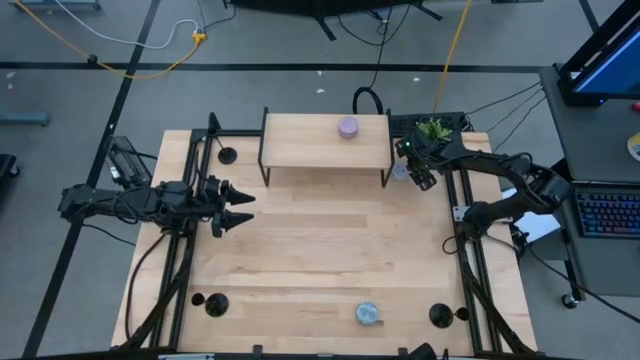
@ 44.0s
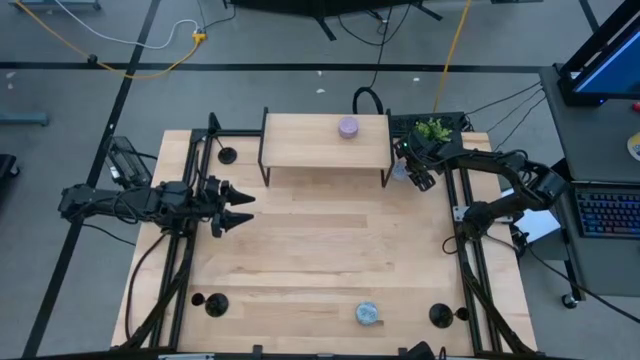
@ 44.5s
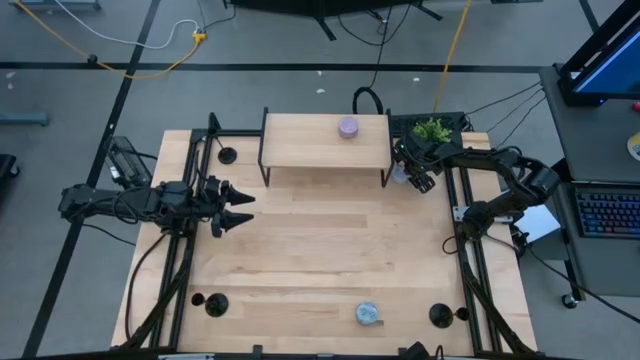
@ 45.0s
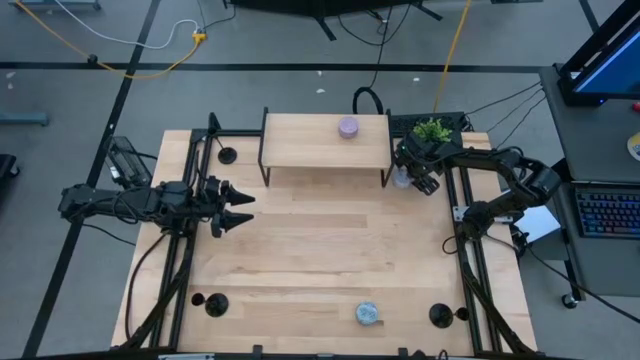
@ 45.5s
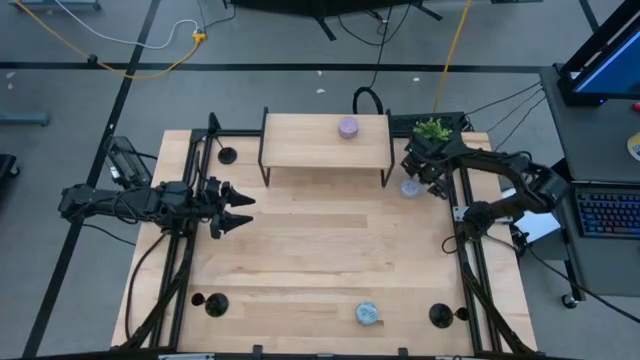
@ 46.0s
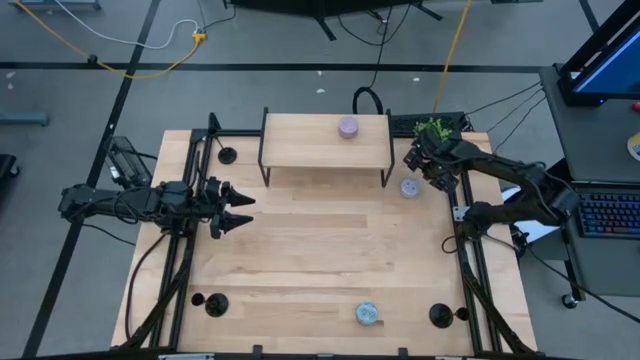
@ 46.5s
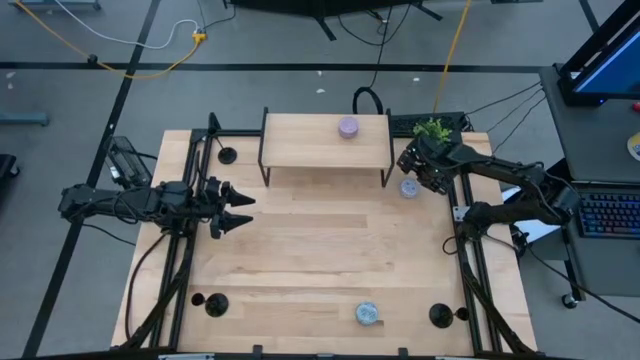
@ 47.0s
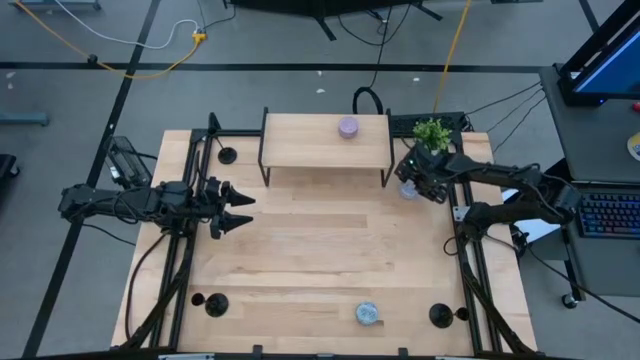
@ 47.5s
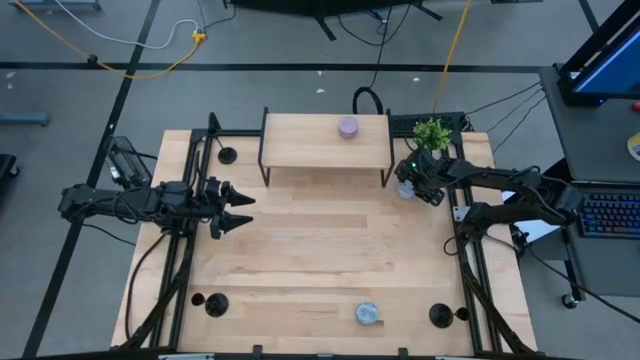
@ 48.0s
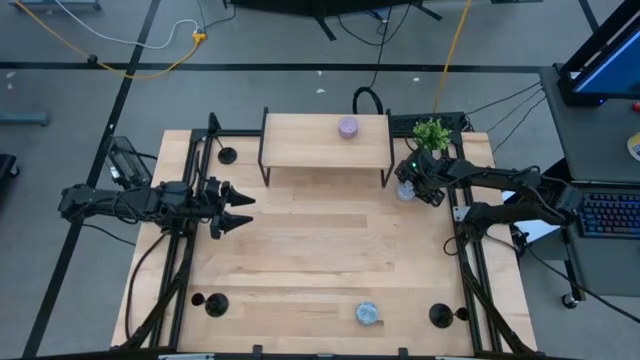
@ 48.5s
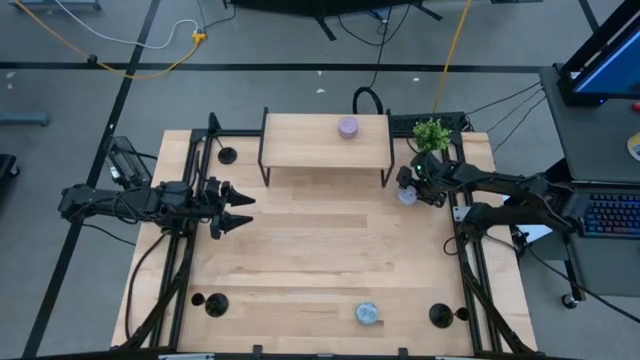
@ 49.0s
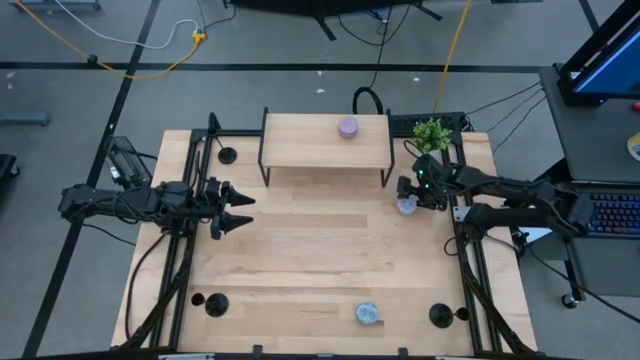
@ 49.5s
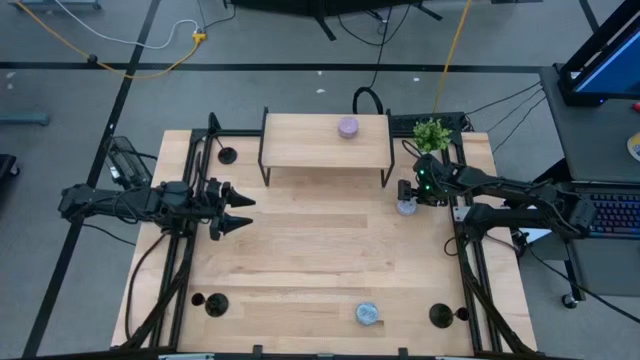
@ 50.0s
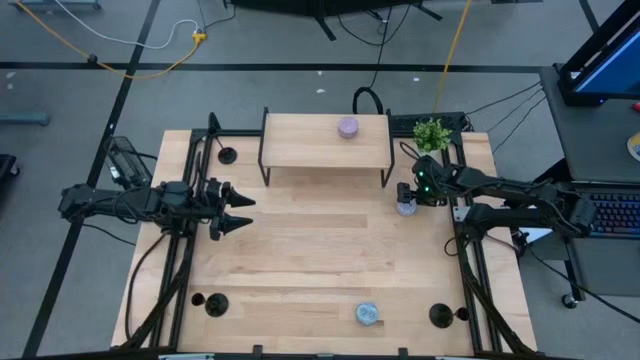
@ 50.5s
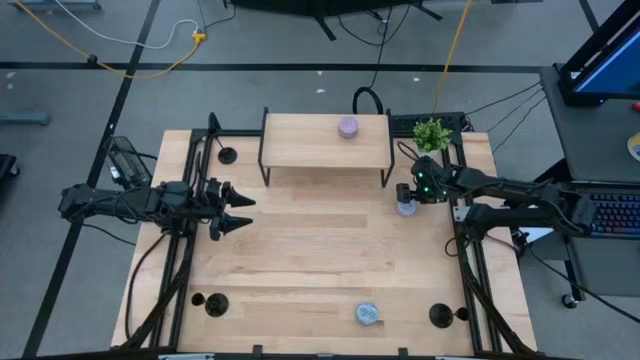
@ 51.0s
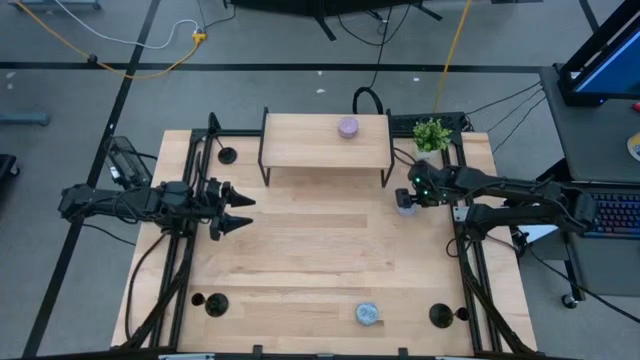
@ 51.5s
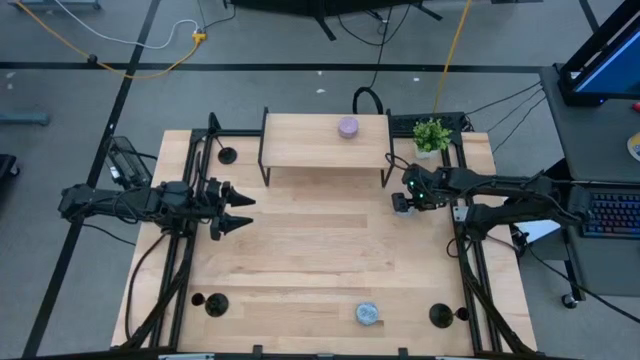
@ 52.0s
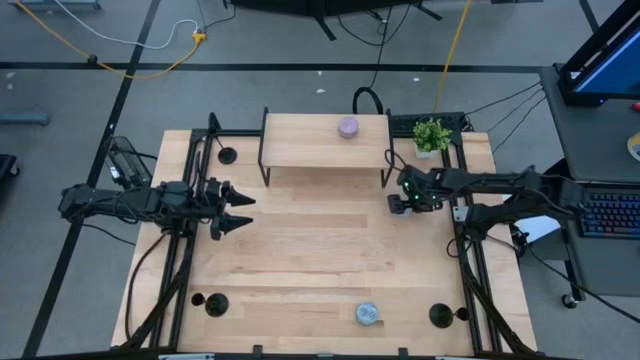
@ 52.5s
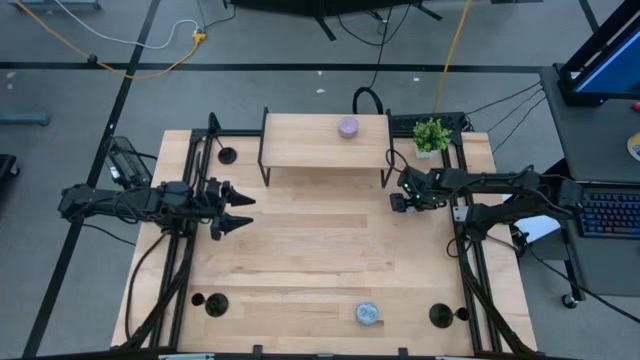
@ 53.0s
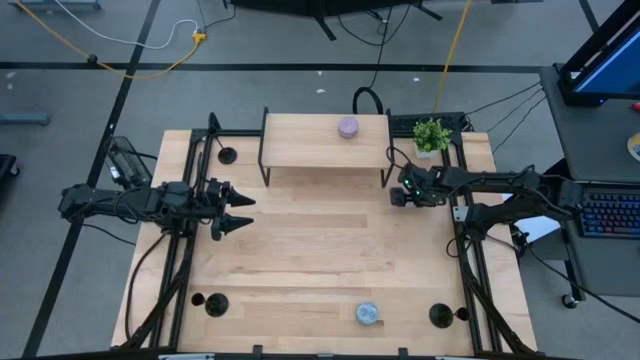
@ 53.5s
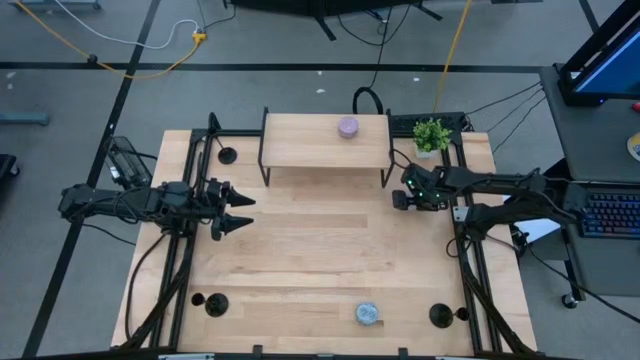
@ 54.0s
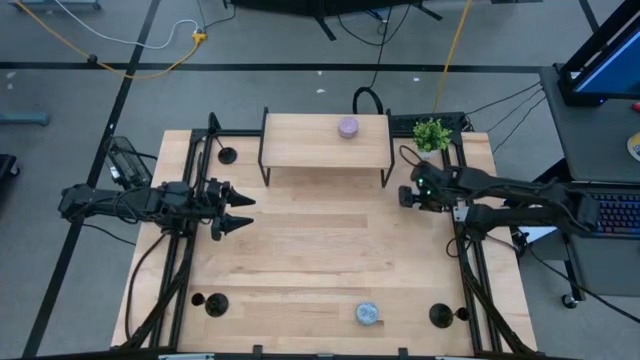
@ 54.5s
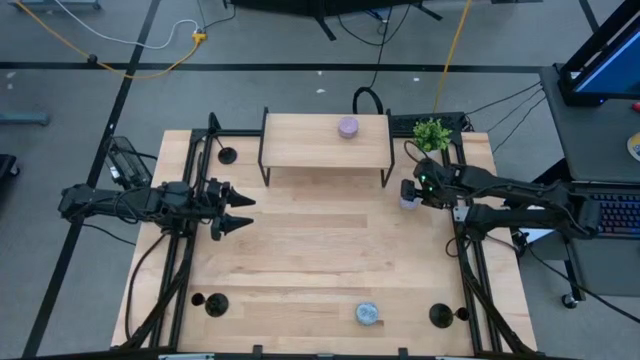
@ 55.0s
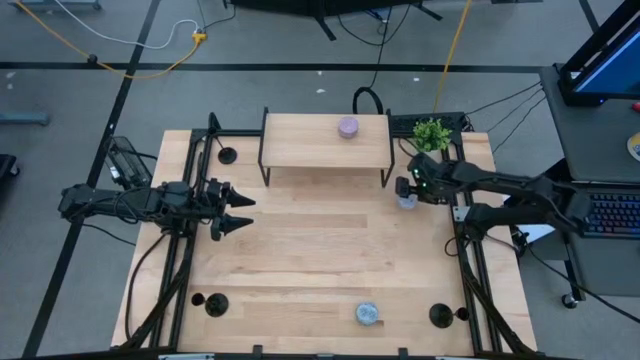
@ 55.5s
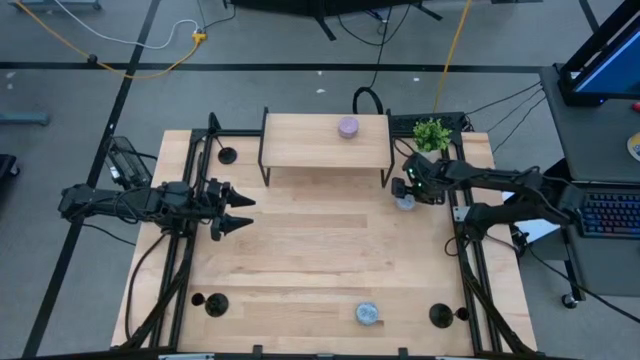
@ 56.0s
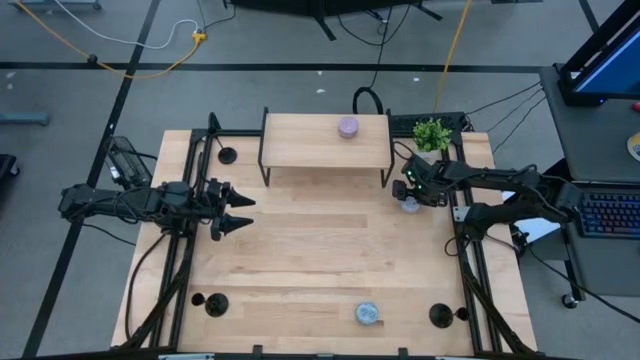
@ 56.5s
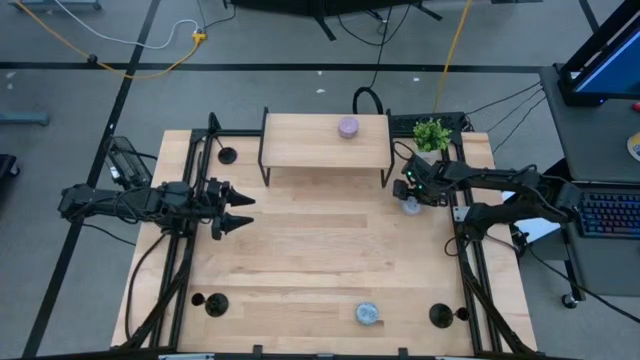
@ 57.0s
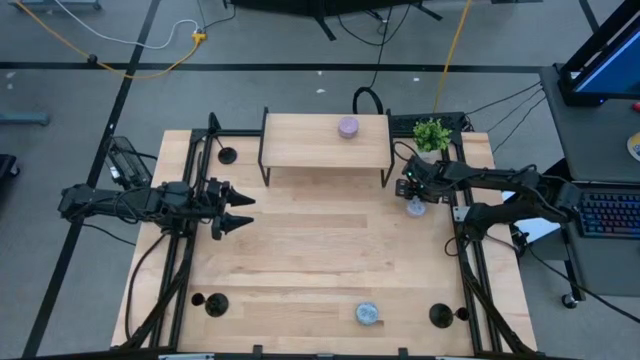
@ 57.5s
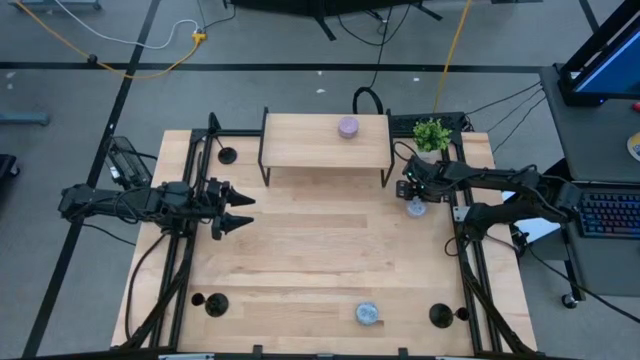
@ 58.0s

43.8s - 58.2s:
Task: Pick & Place candle stick holders
Put the white patterned scented candle on the shelf

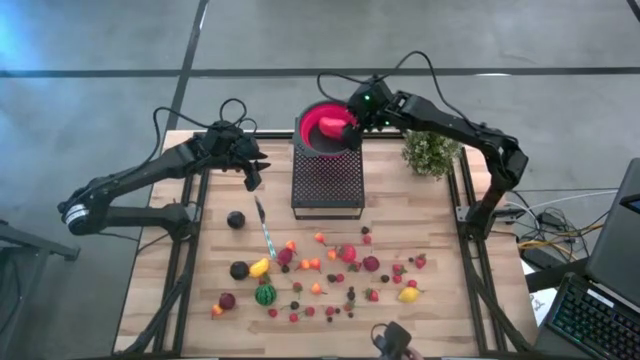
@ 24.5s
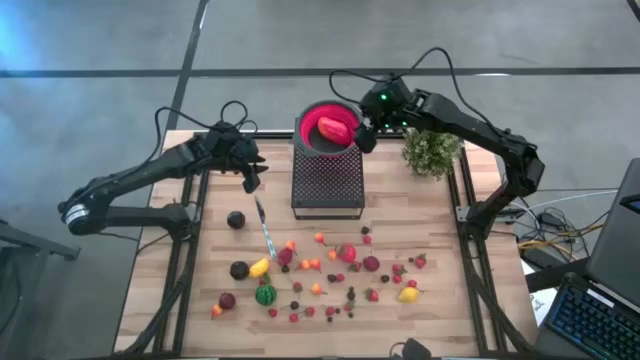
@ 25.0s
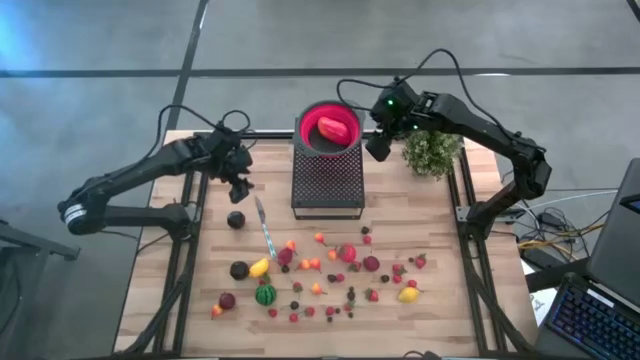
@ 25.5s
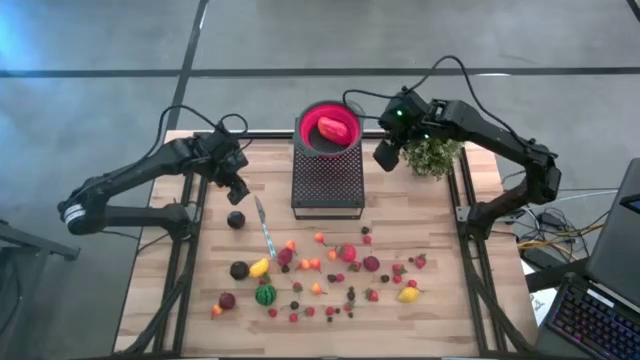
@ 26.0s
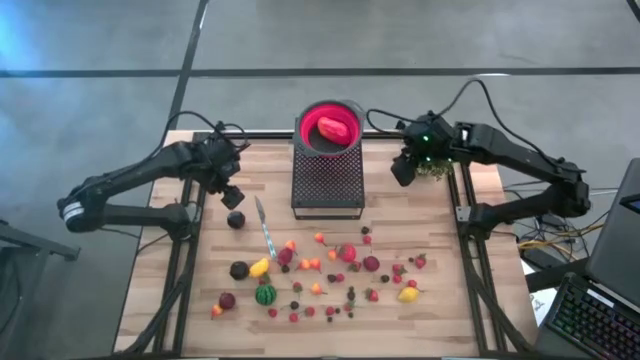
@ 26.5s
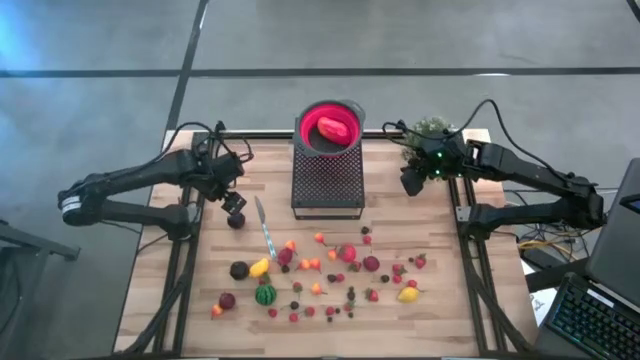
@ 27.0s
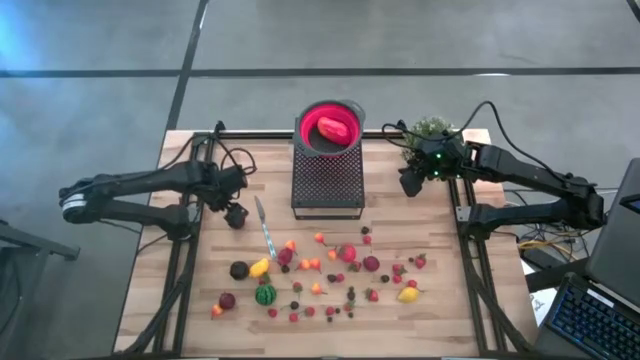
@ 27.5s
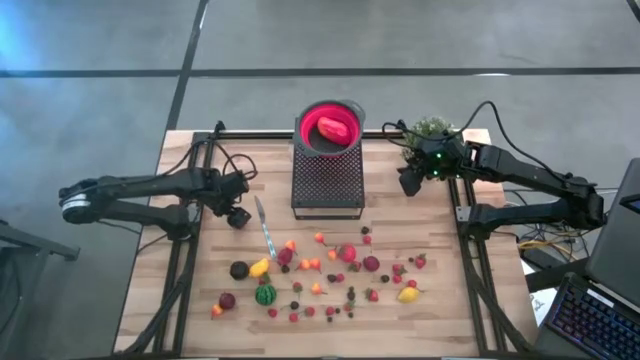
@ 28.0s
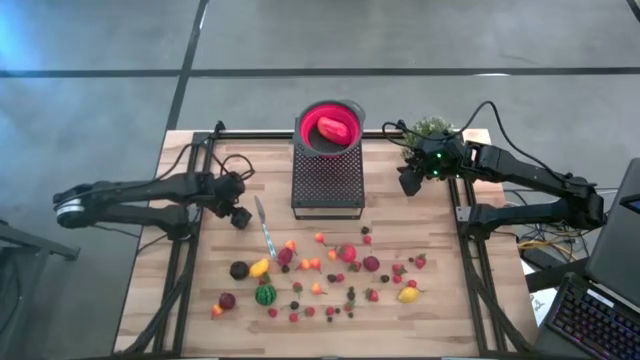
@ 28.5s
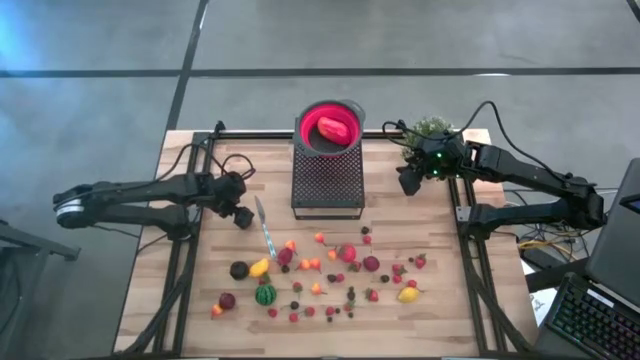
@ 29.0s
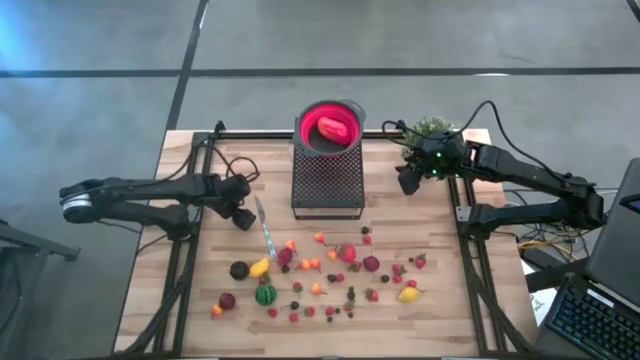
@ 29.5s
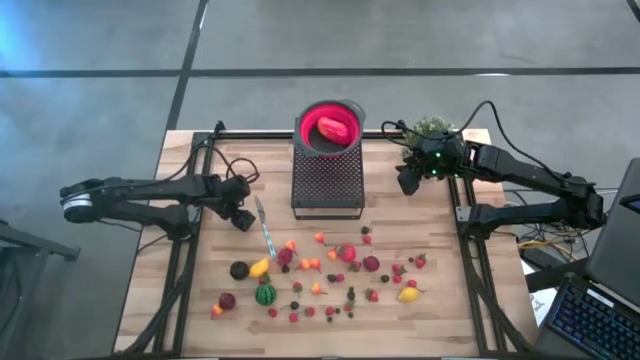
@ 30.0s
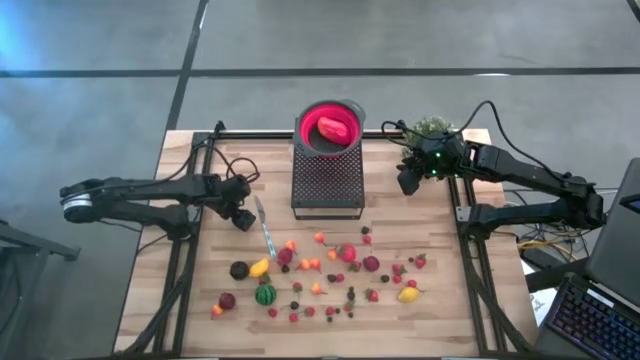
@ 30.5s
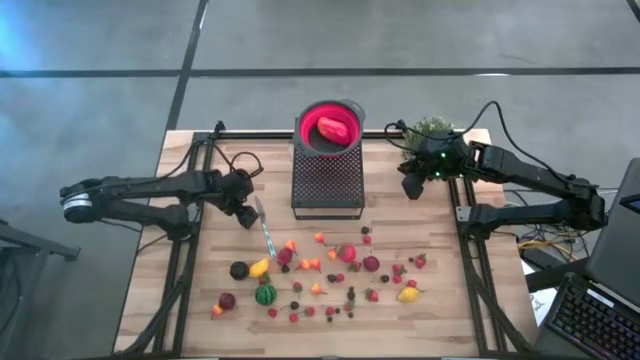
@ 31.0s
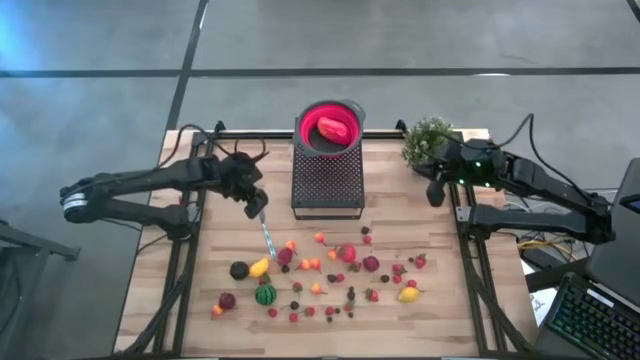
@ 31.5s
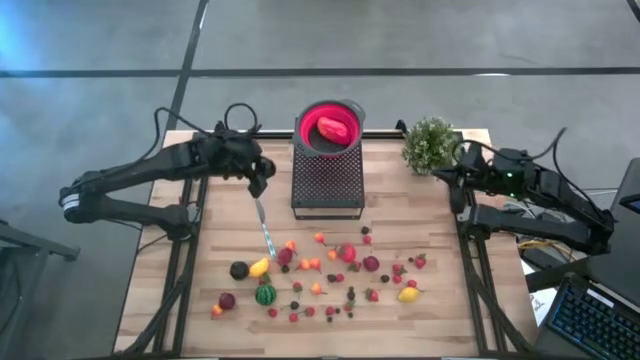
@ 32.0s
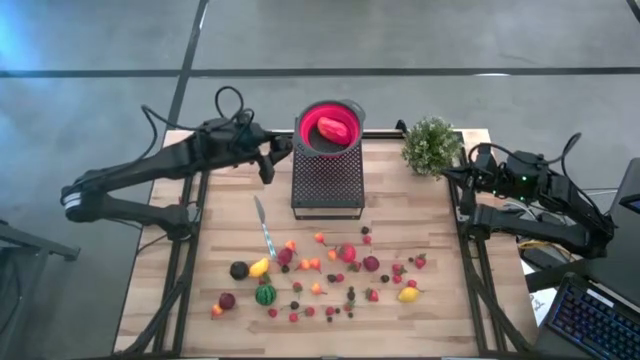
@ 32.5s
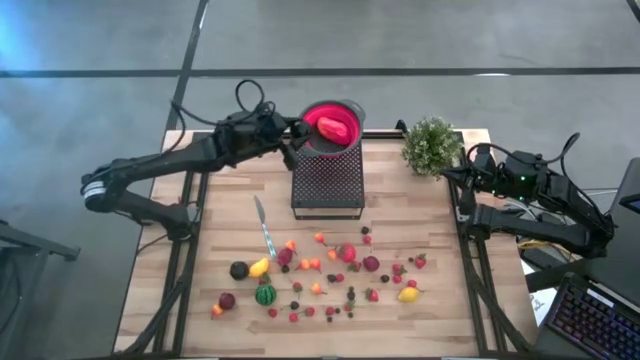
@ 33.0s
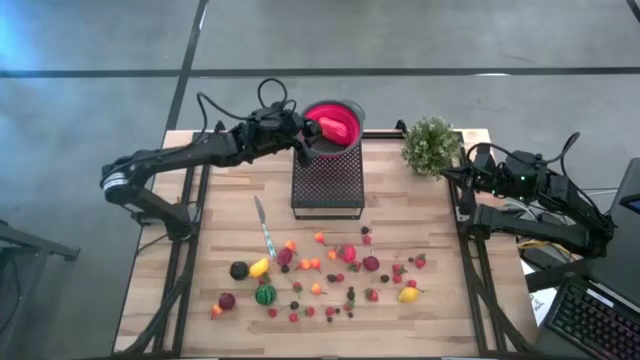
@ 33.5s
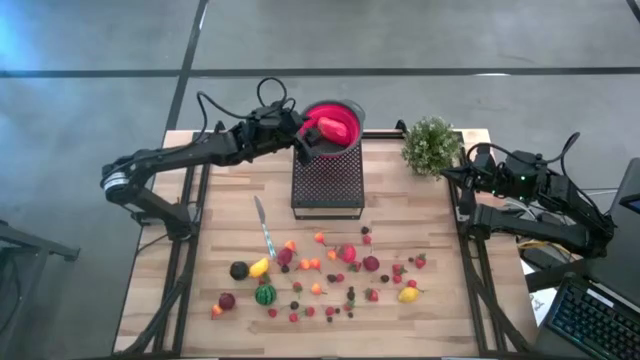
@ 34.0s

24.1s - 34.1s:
Task: Pick & Place Fruit
Put the top plum into the strainer bowl on the shelf
